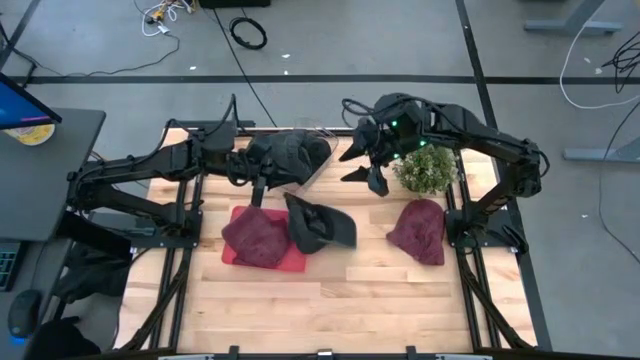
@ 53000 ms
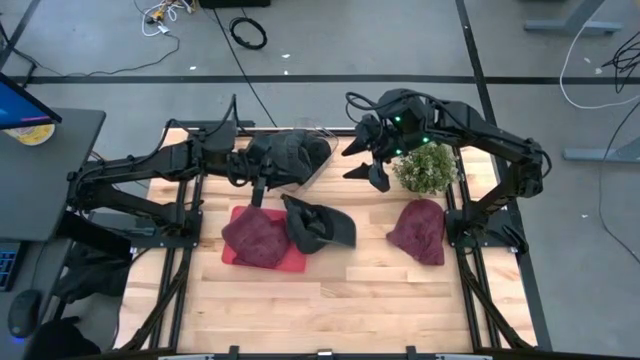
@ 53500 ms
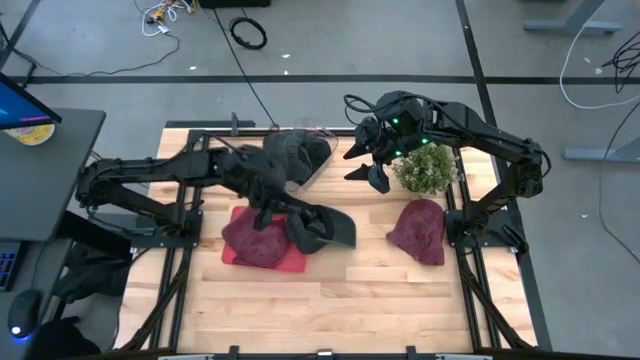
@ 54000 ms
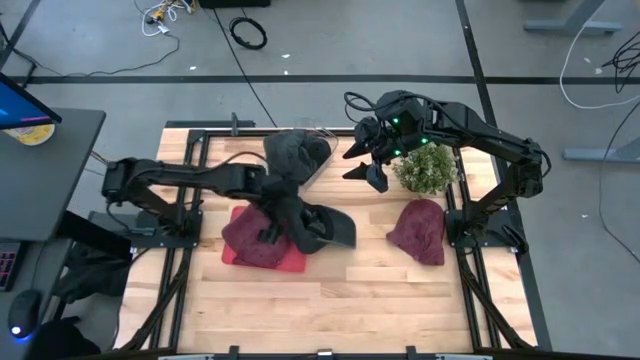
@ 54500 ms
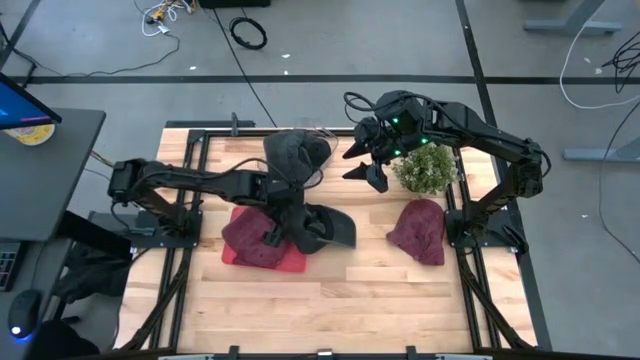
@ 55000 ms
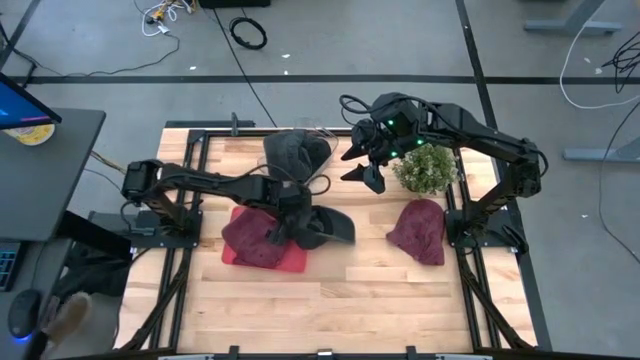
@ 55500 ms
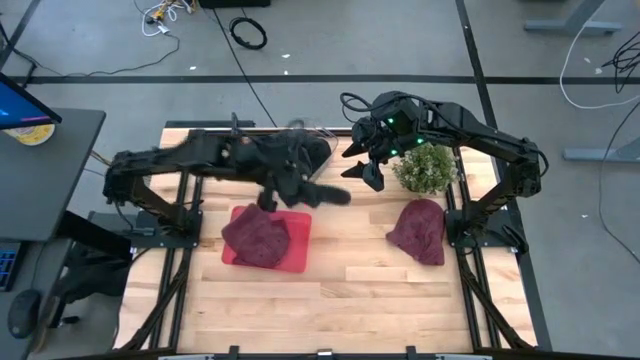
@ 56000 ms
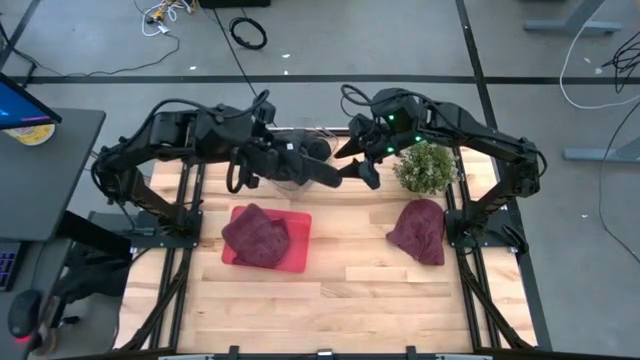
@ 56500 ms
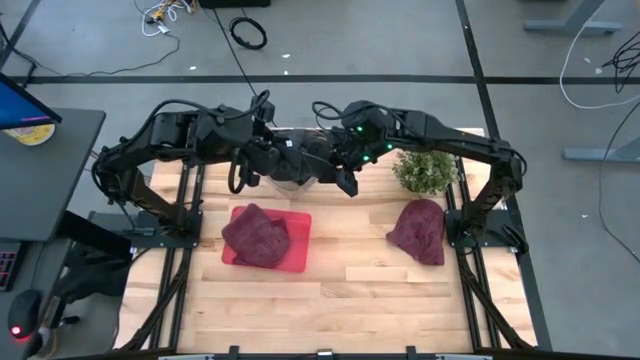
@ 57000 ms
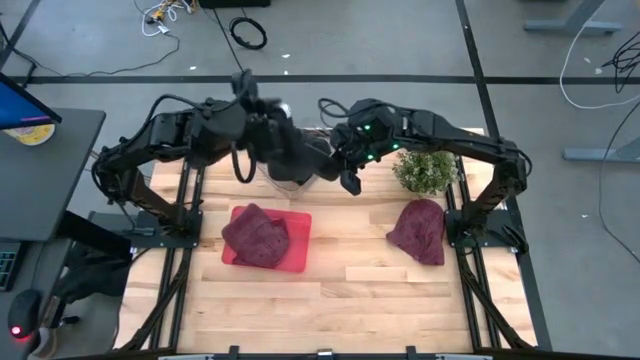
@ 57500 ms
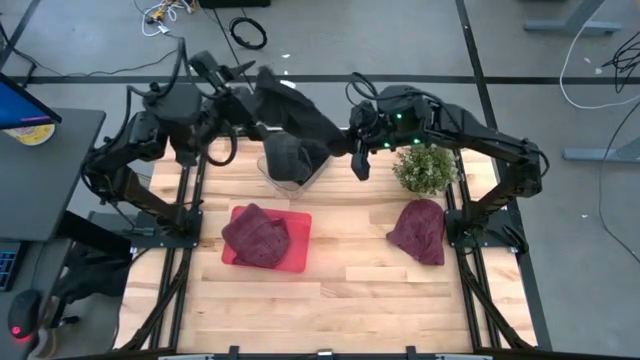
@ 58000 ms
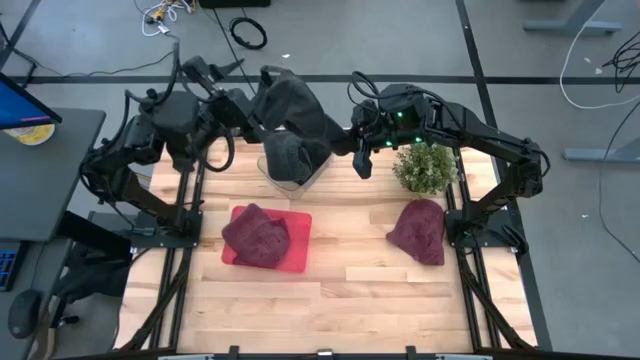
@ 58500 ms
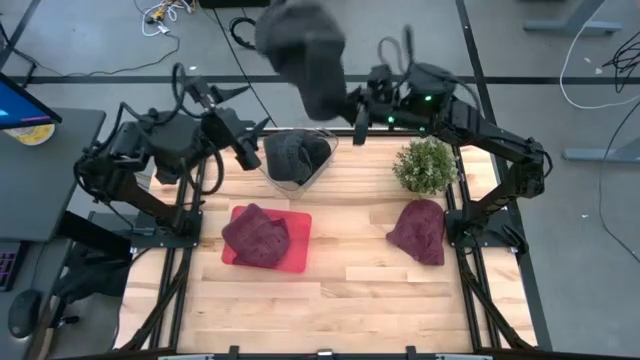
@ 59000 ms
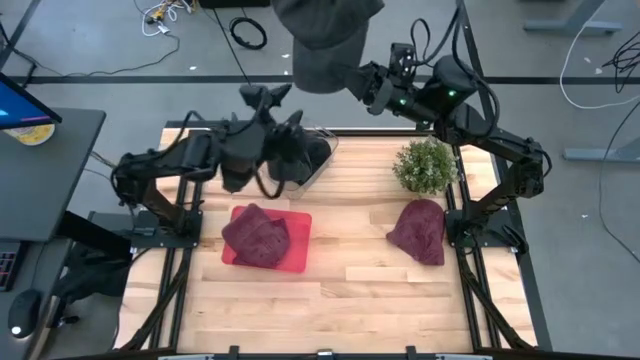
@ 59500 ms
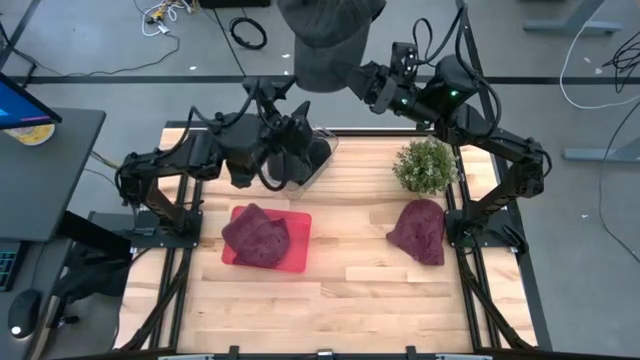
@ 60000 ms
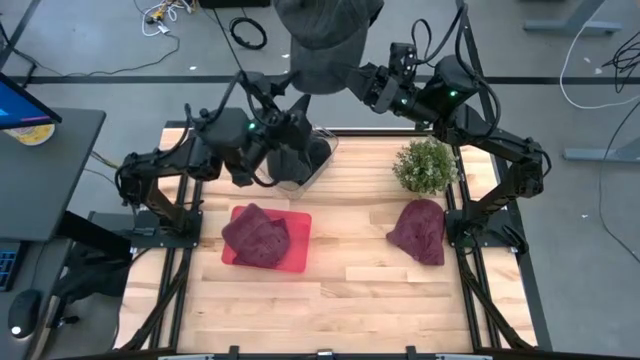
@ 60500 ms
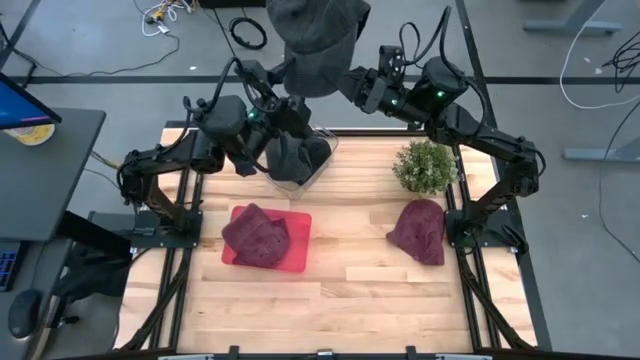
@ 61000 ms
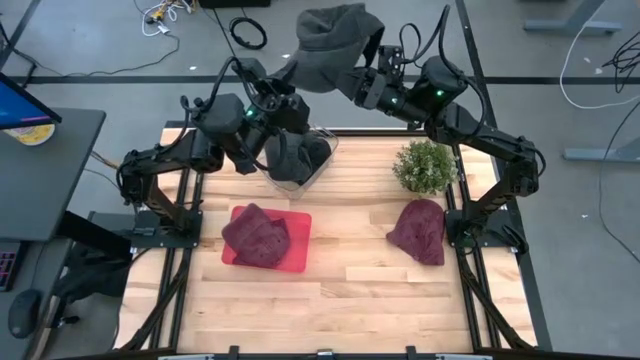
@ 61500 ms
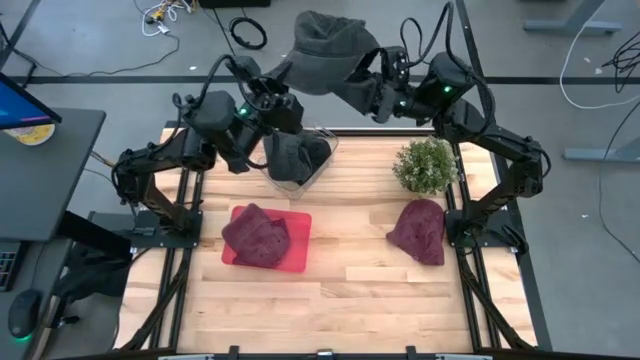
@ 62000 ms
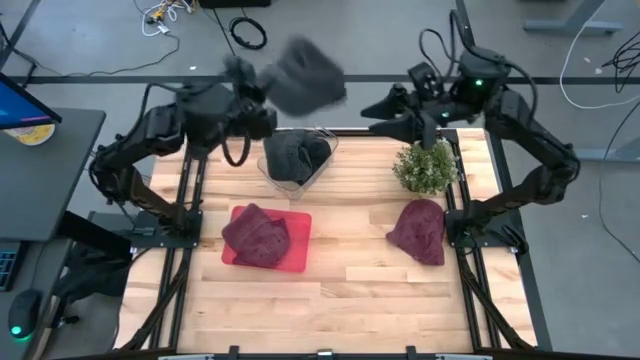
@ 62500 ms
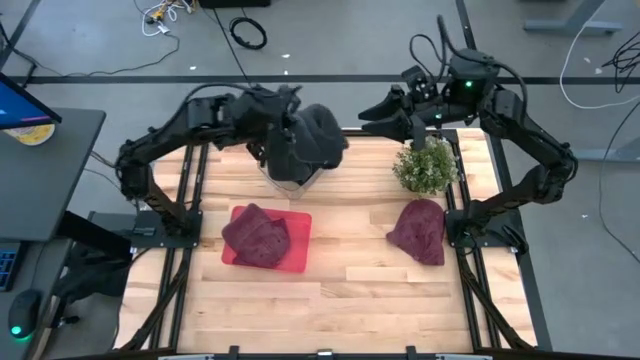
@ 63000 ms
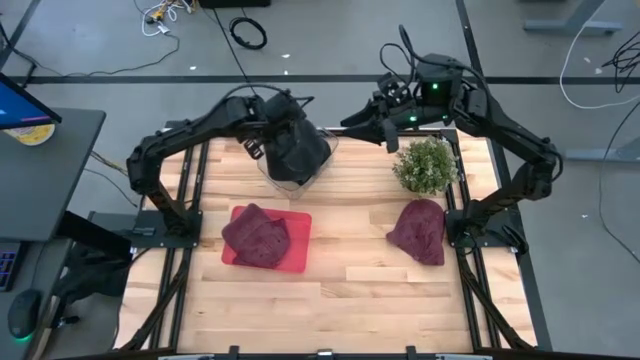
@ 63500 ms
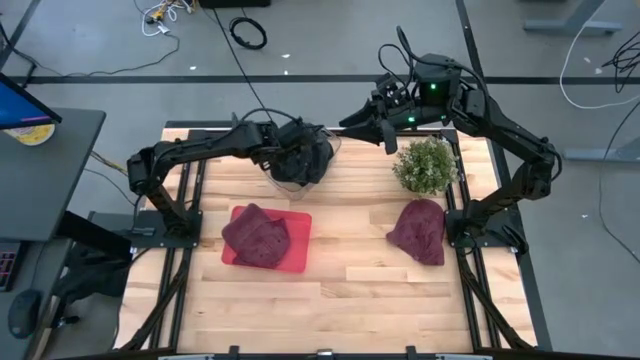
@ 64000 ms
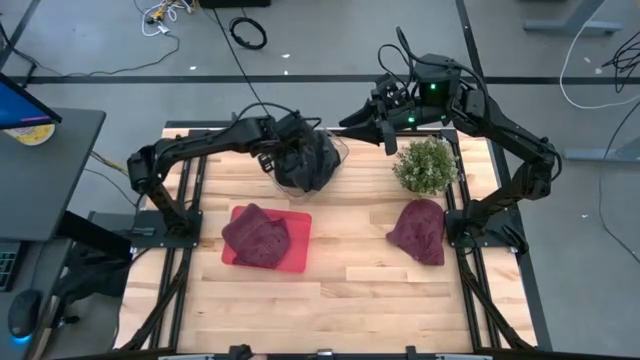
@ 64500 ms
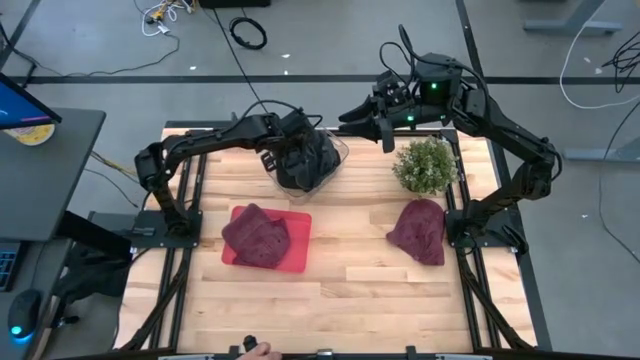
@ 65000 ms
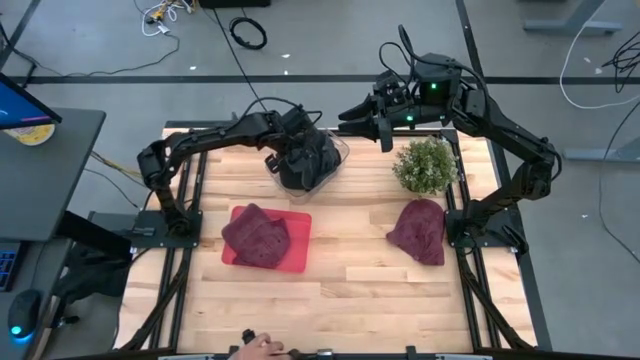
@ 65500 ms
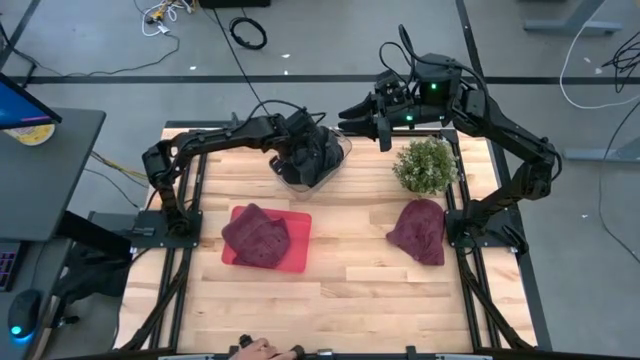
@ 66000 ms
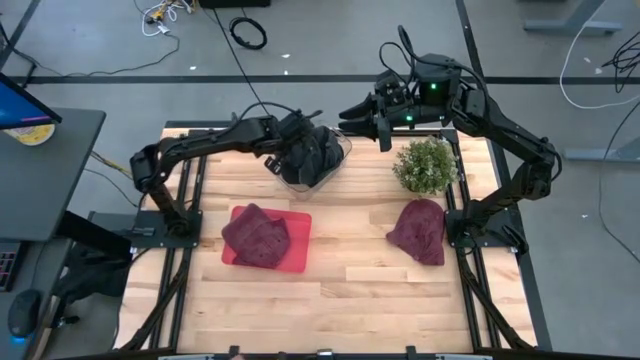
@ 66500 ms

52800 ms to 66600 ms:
Task: Pick & Place hat
Put the black cap into the transparent bin

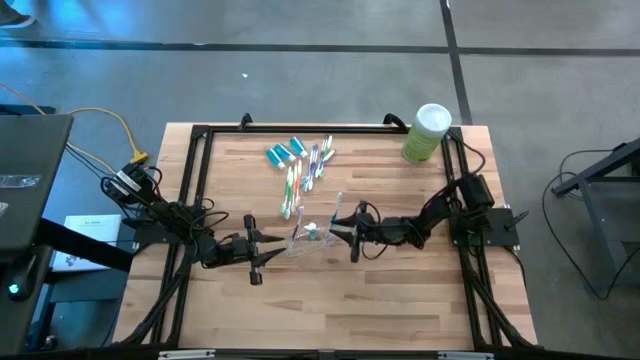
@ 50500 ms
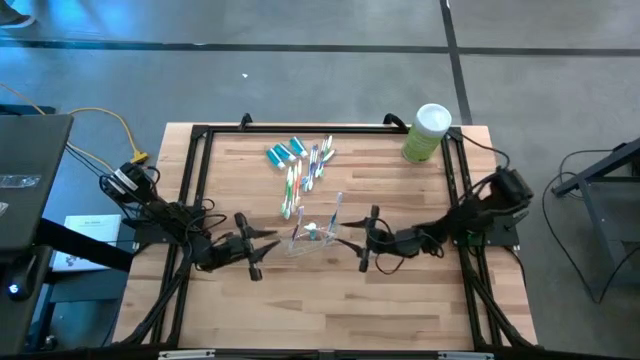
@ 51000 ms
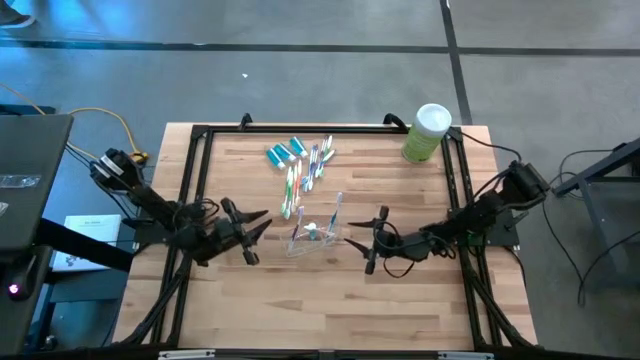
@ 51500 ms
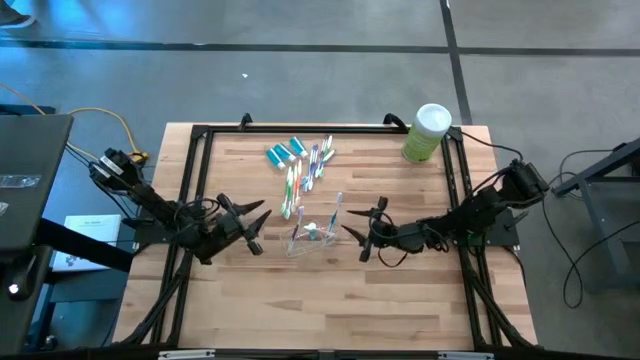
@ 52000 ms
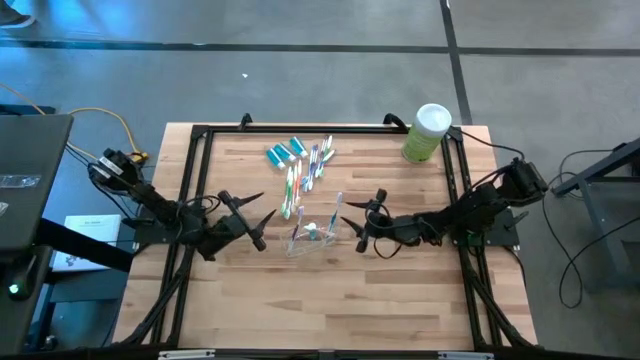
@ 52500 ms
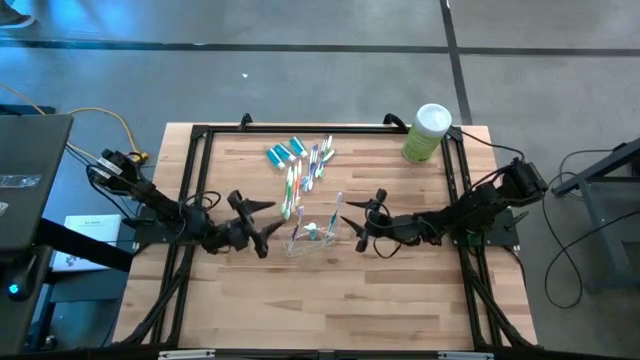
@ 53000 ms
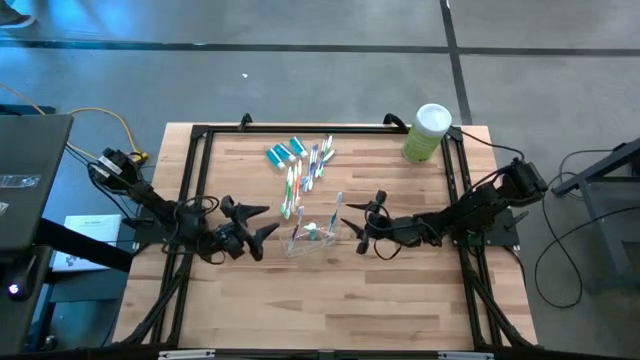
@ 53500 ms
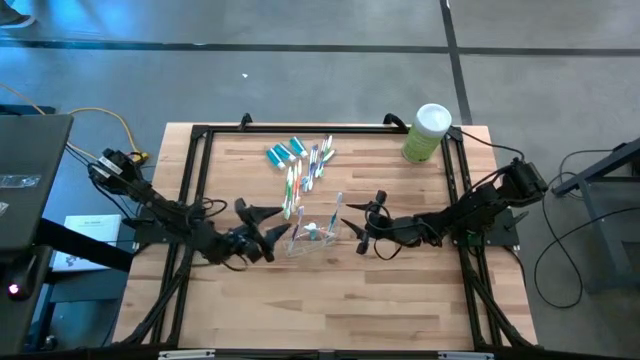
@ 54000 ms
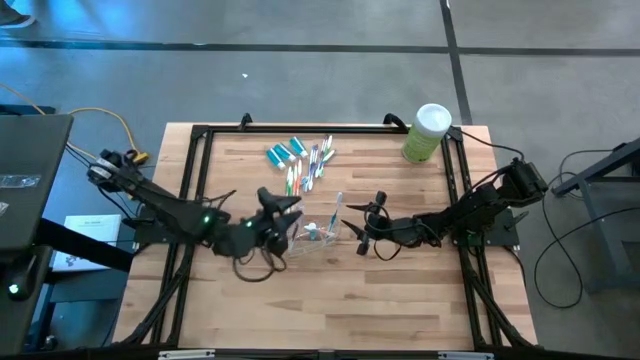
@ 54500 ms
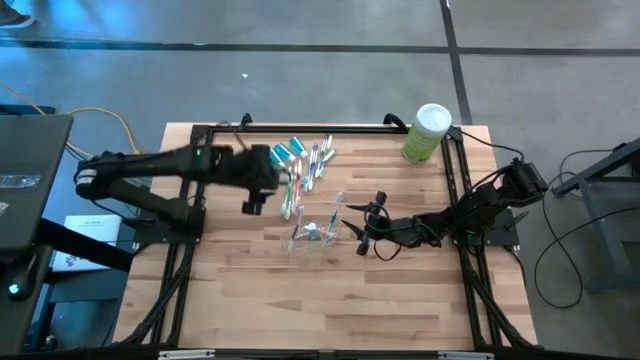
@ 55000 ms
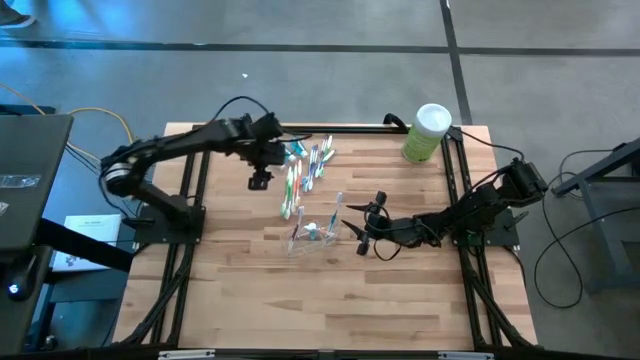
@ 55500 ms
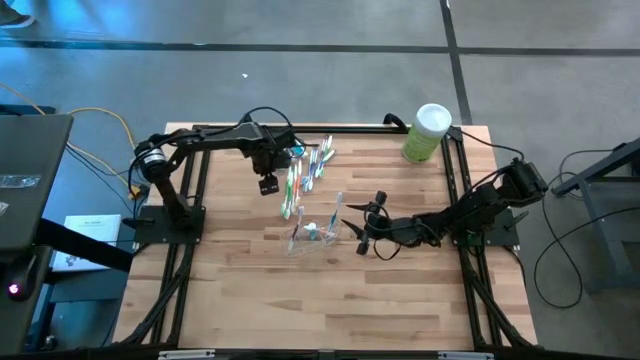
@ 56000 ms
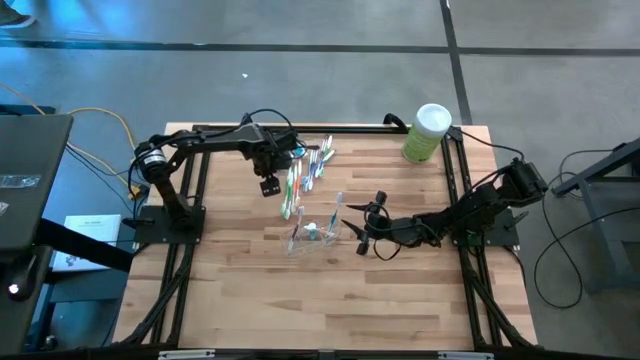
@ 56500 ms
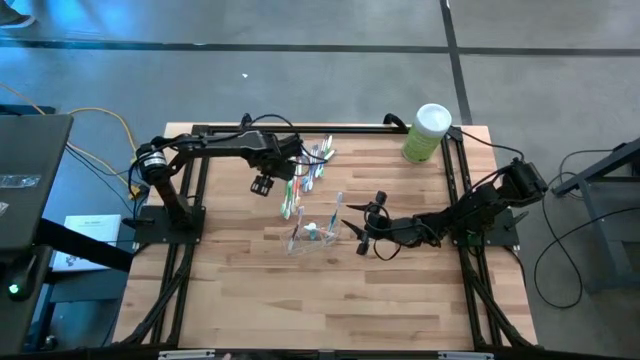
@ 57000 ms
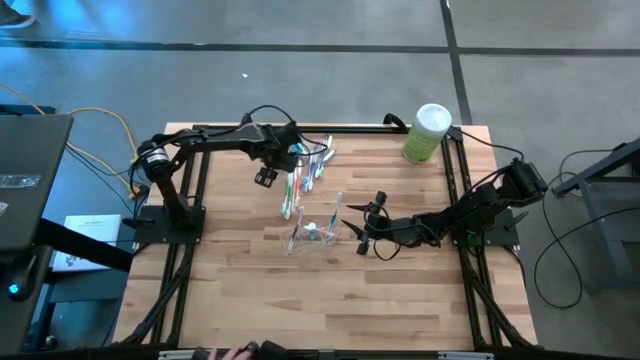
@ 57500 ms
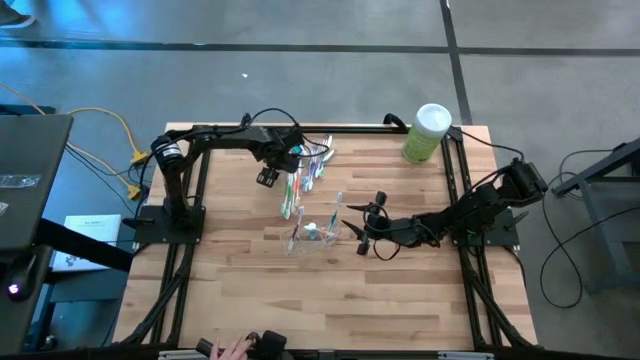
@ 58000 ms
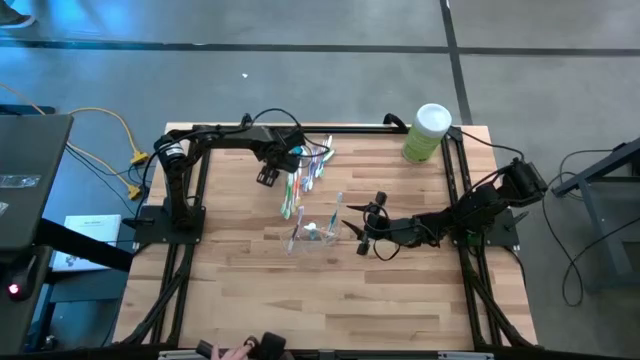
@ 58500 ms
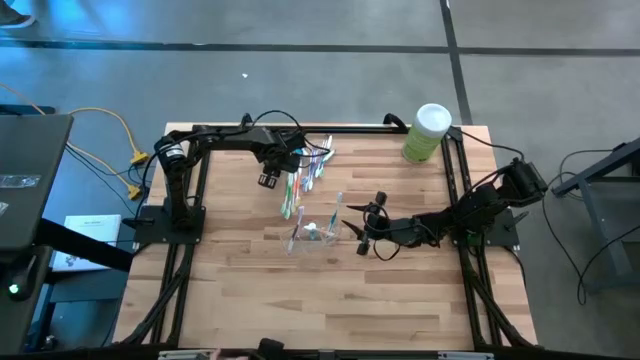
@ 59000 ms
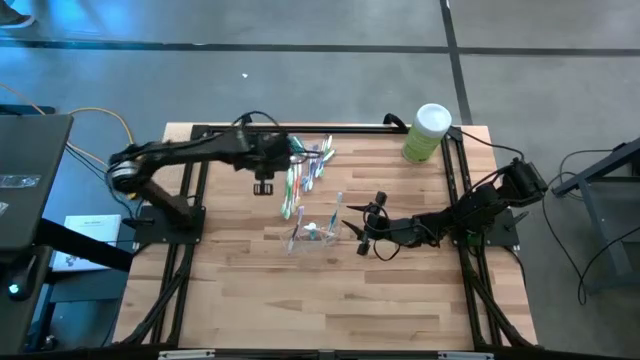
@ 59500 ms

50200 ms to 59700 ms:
Task: Pick & Place toothbrushing station
Put the blue mouthwash into the transparent organizer
